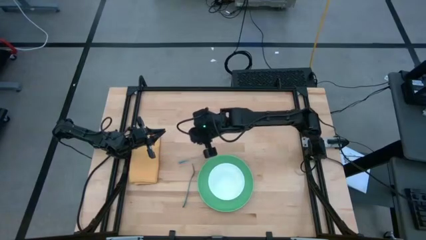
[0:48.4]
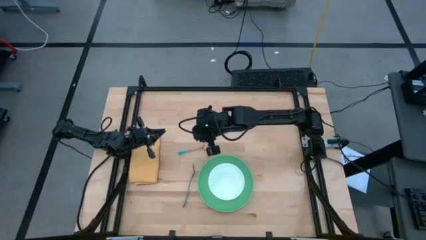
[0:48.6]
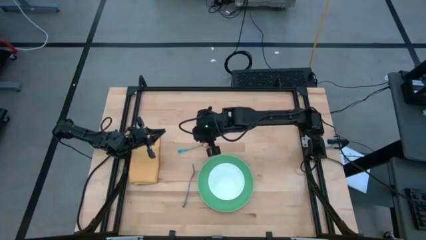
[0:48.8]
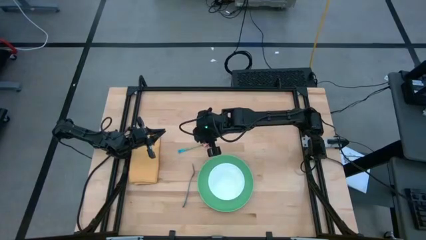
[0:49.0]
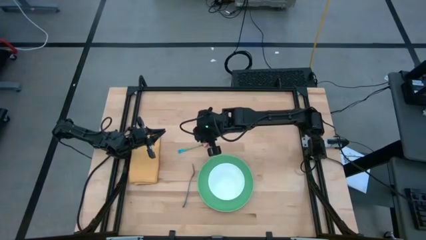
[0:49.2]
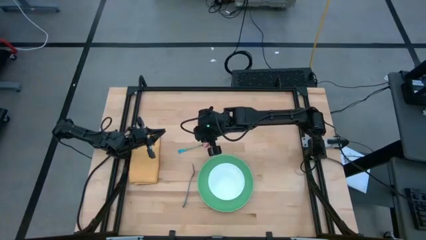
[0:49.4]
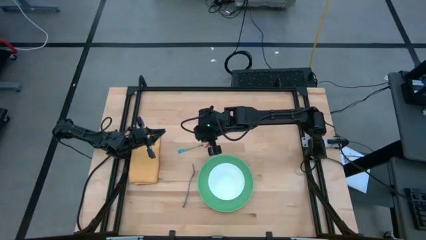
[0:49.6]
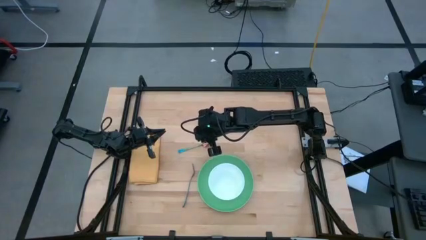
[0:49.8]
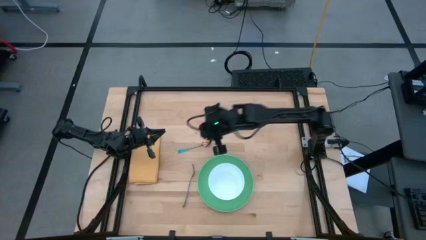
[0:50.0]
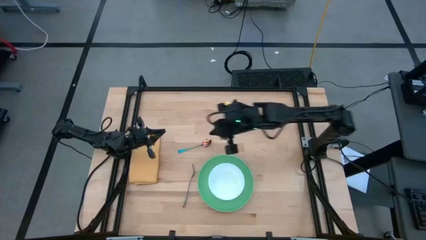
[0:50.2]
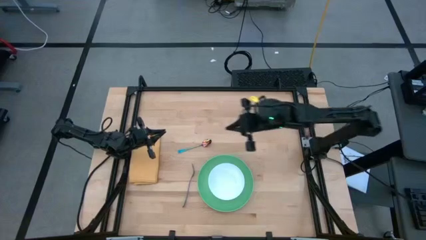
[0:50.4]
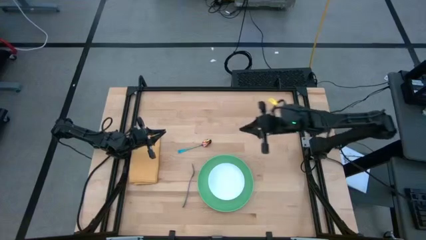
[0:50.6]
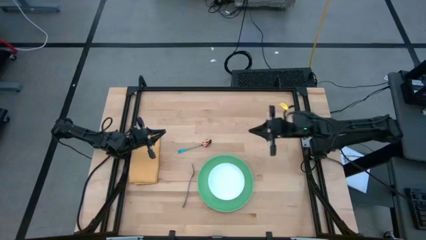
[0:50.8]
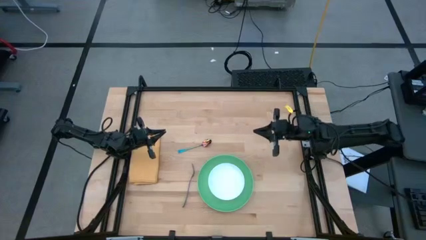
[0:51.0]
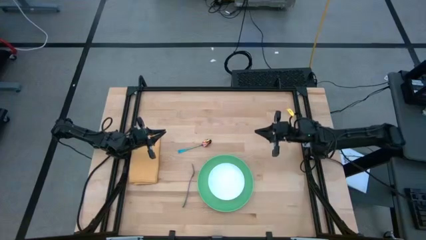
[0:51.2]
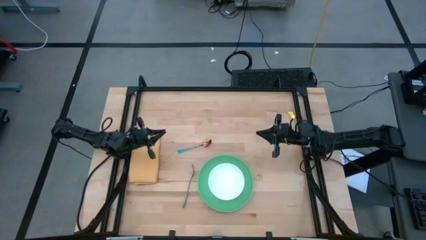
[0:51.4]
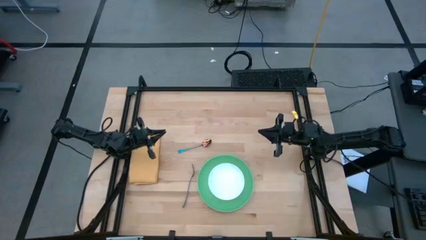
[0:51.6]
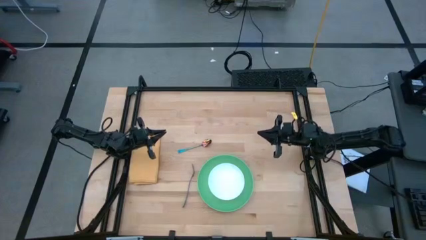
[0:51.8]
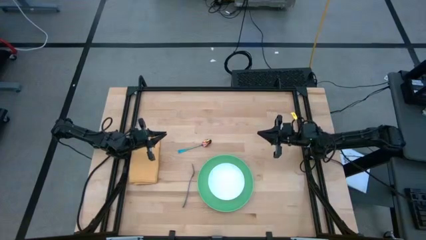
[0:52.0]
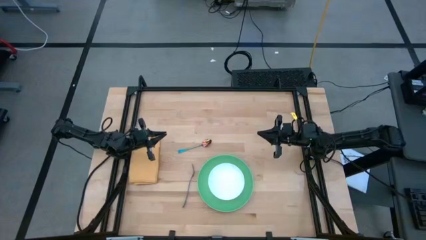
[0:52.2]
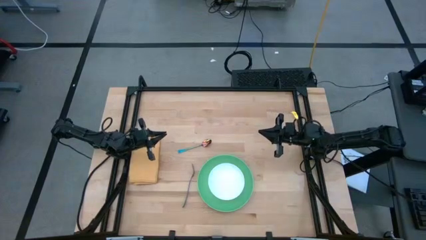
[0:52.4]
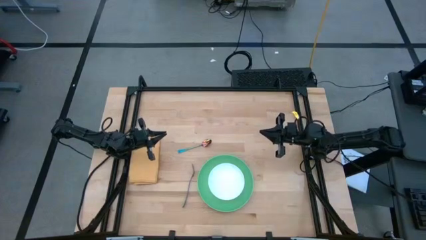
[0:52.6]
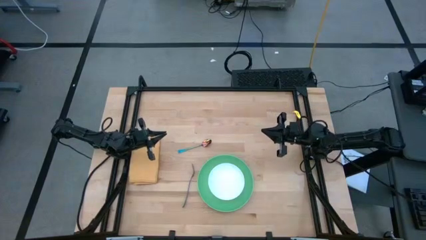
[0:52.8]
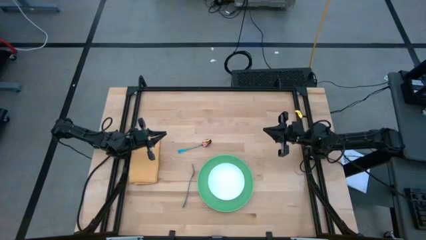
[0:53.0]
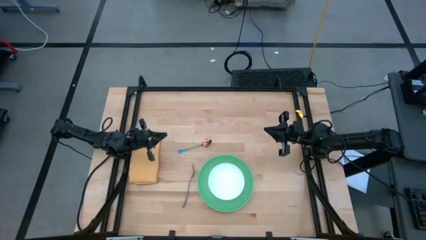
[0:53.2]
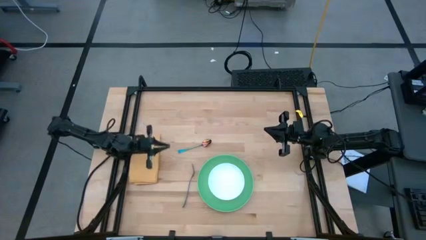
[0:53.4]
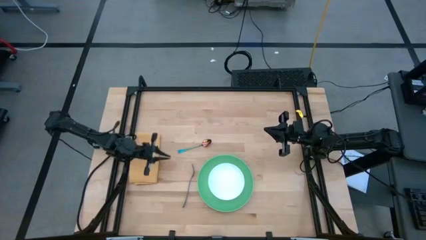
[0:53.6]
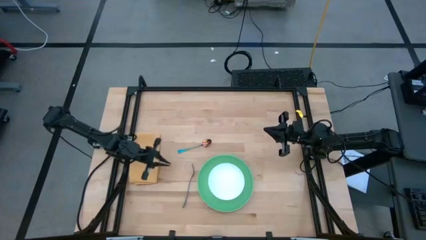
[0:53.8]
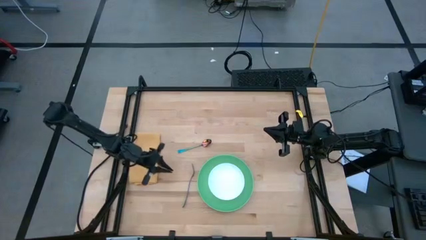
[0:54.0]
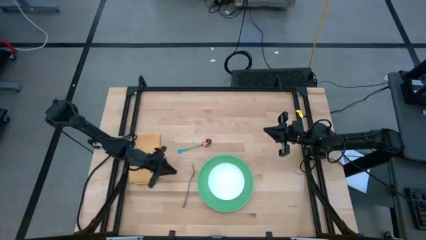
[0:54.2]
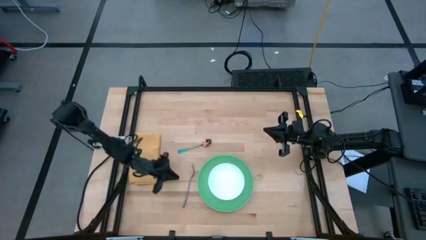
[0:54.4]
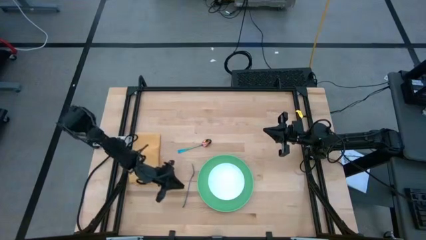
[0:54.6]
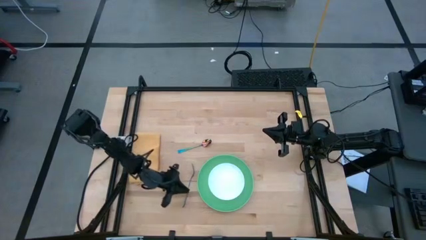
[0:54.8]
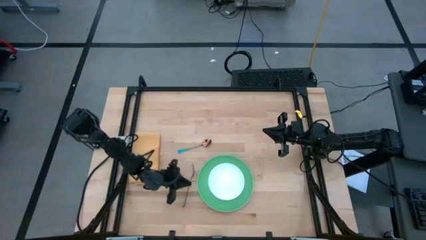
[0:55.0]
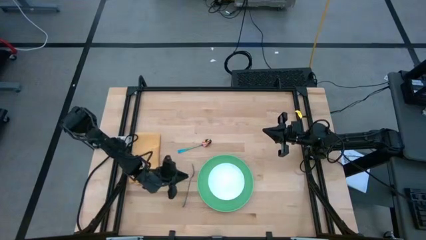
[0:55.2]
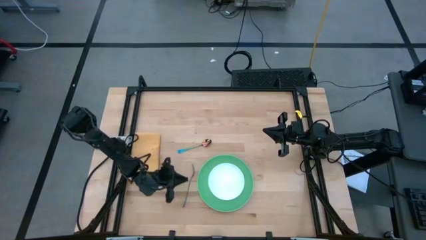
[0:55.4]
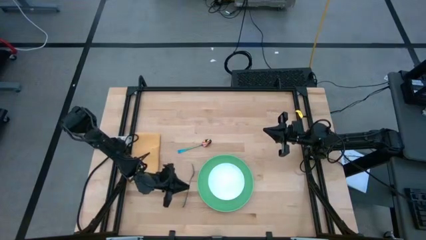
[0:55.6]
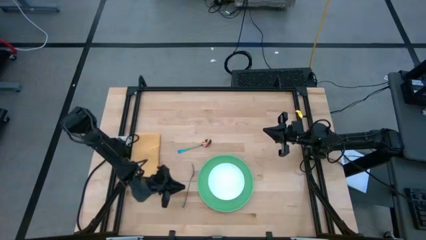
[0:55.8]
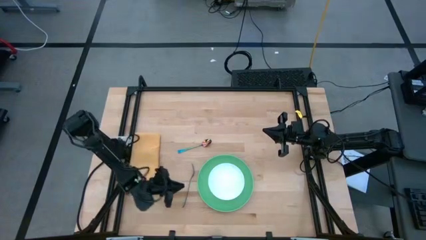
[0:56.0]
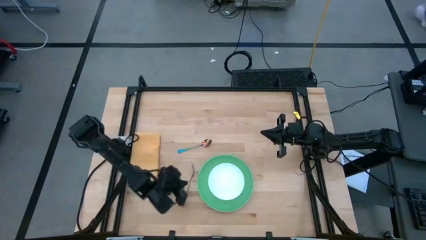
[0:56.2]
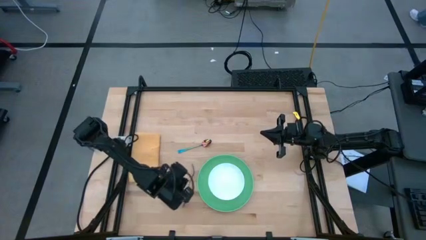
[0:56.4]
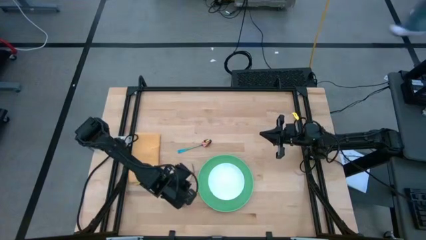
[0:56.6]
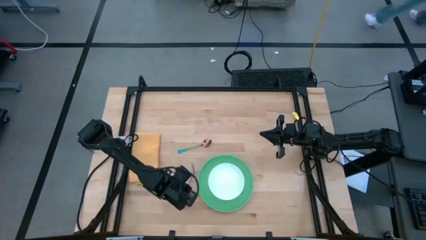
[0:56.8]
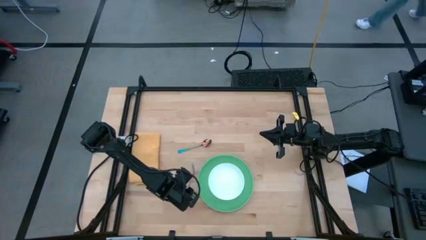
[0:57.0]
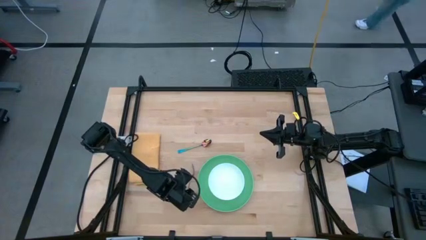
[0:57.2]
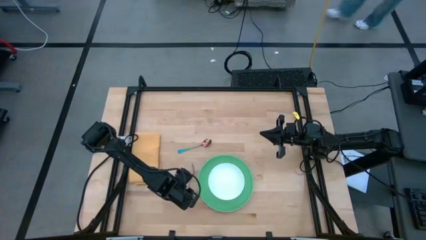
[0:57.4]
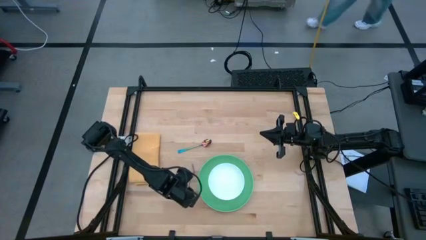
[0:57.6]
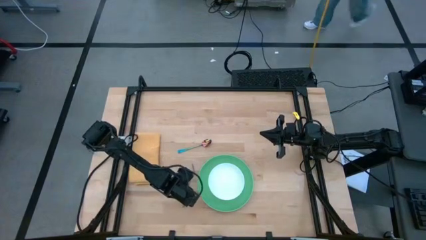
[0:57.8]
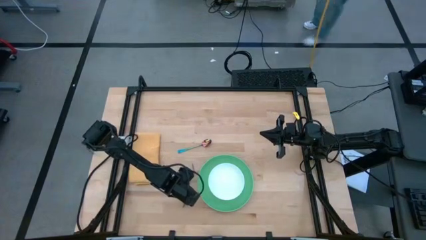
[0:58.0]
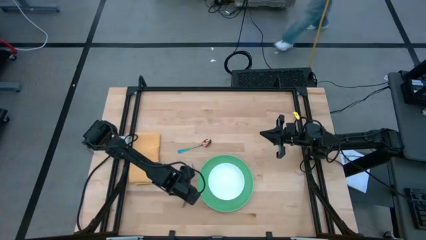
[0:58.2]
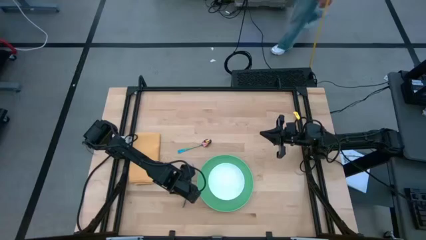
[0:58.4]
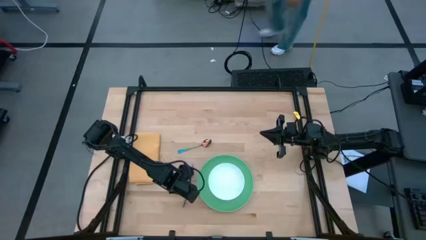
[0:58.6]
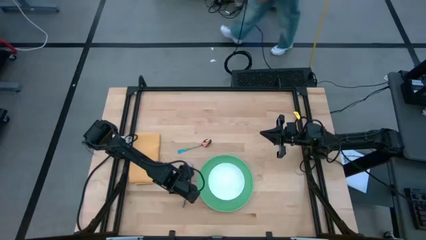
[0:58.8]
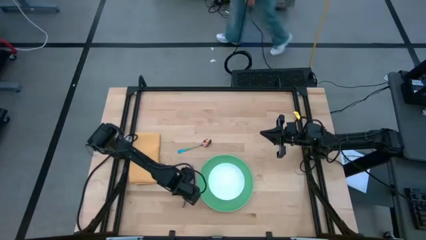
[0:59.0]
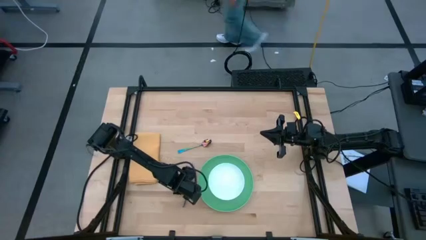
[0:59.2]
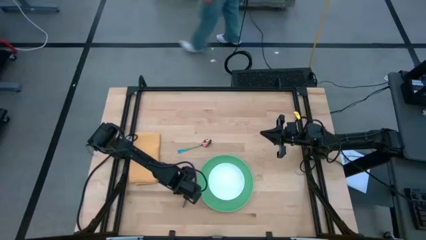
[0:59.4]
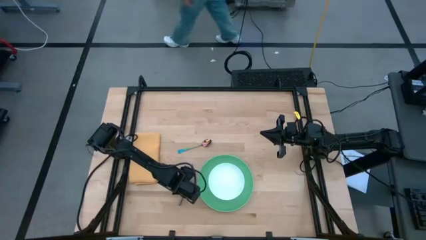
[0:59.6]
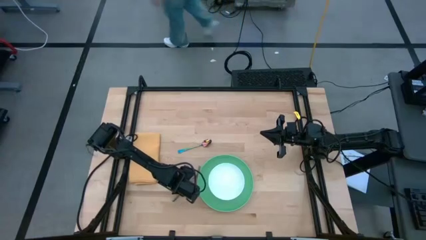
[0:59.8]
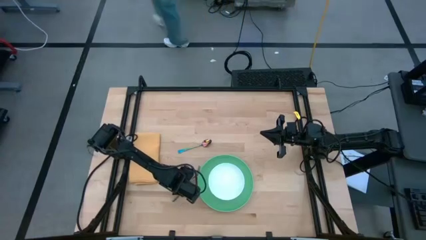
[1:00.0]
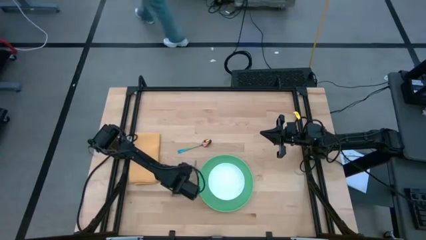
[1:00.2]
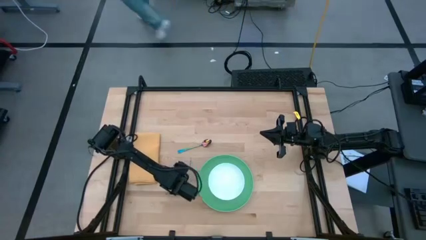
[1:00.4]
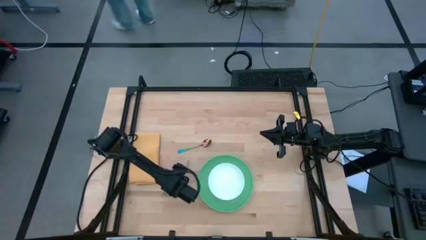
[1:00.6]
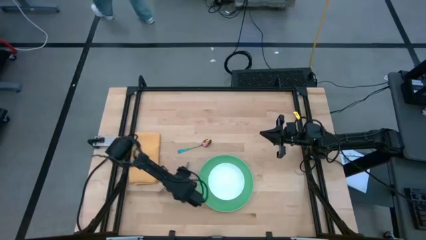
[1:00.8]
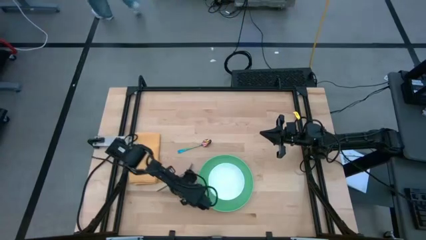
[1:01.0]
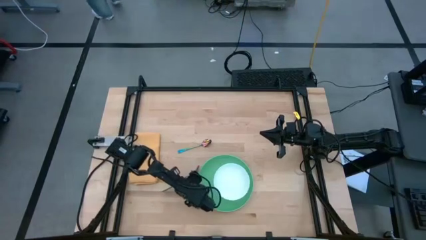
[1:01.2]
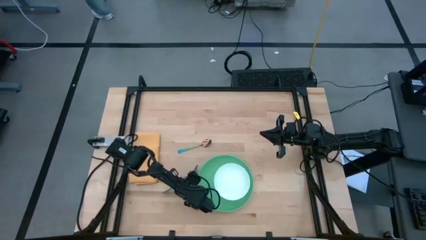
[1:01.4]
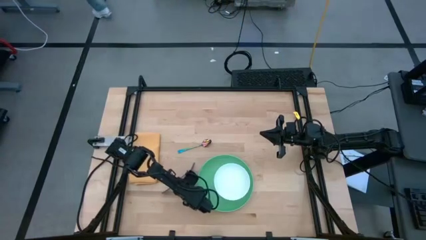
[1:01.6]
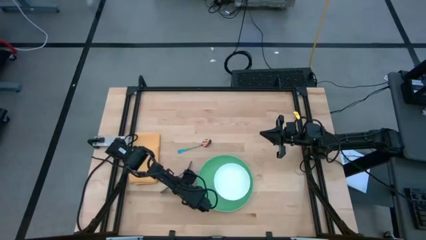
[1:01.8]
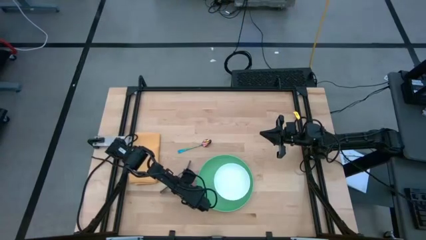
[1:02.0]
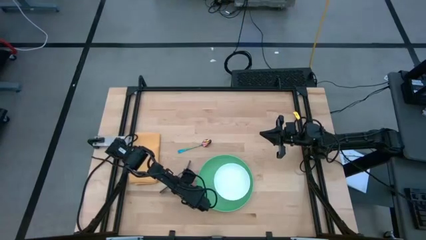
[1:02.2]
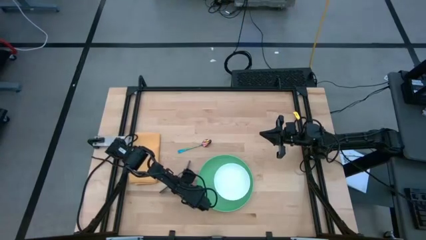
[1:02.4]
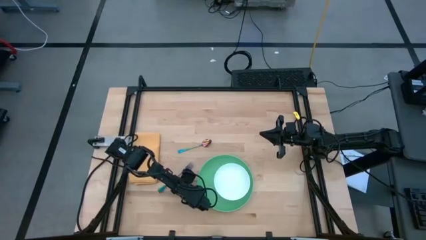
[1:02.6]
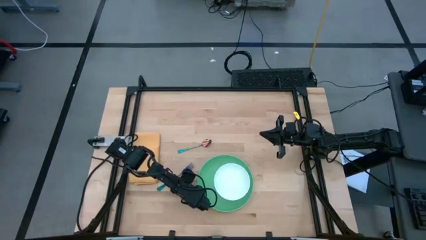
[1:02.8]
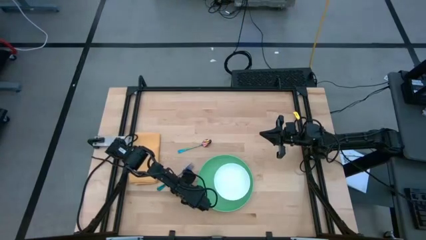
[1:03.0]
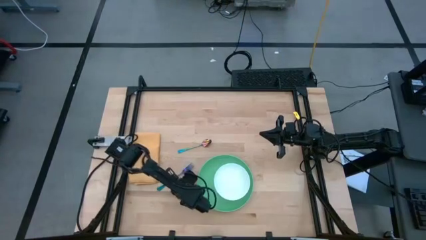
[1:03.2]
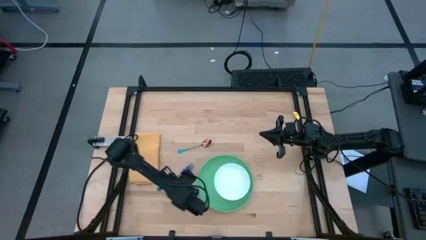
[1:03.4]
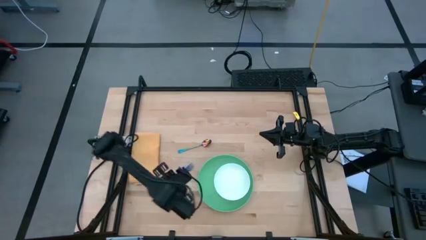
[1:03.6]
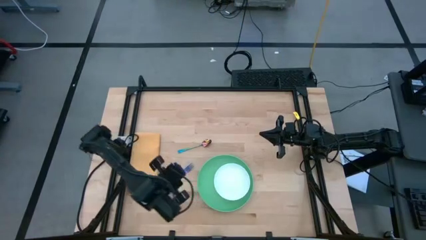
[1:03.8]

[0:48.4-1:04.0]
Task: Set table place
Adjust the violet fork and white bowl
